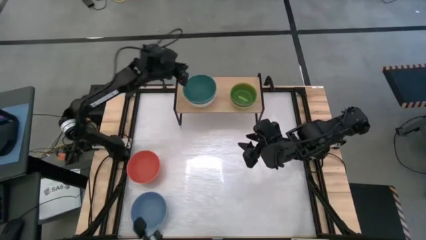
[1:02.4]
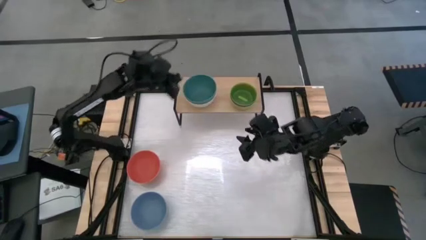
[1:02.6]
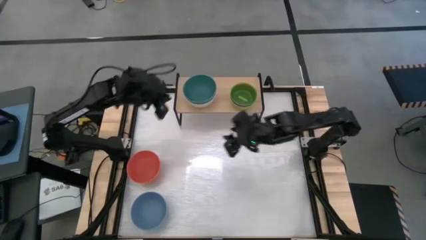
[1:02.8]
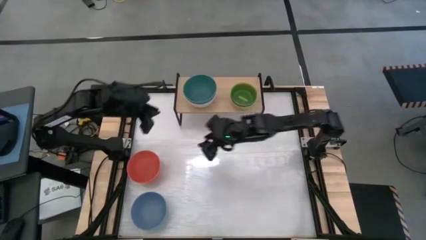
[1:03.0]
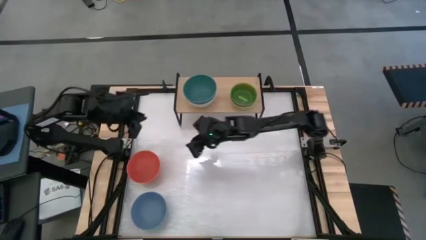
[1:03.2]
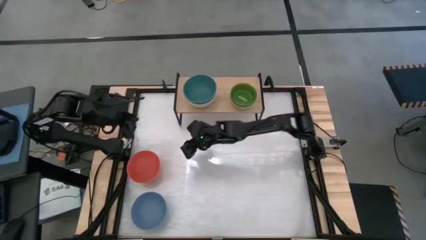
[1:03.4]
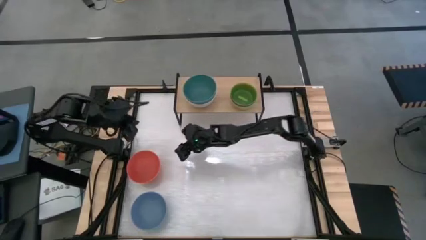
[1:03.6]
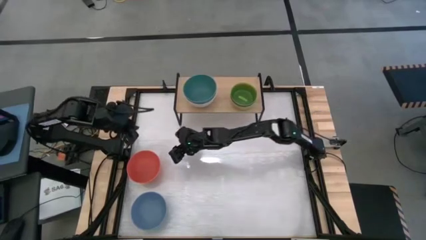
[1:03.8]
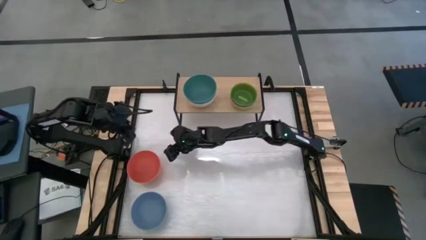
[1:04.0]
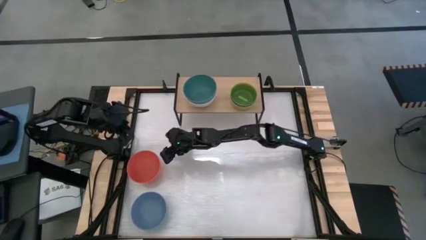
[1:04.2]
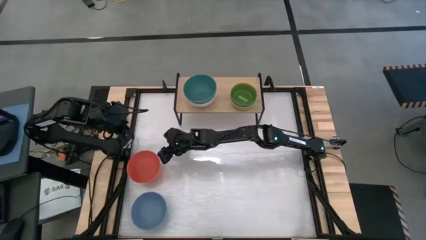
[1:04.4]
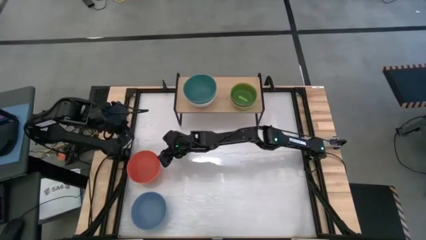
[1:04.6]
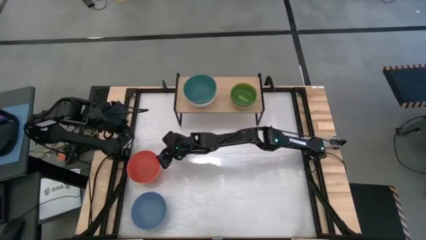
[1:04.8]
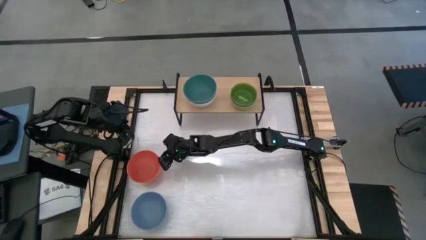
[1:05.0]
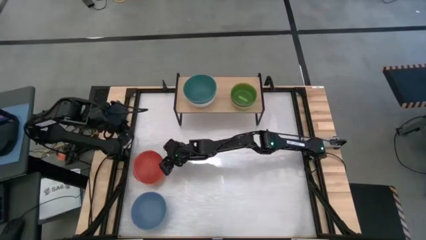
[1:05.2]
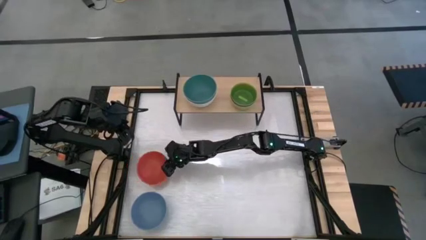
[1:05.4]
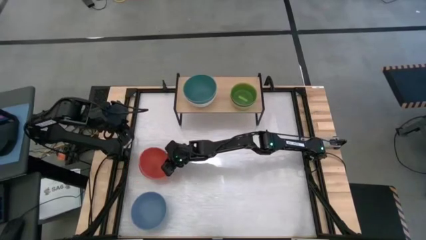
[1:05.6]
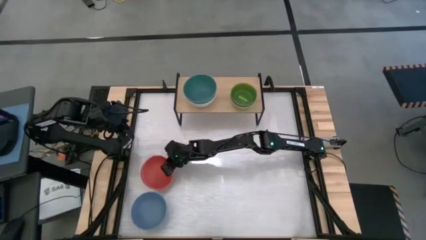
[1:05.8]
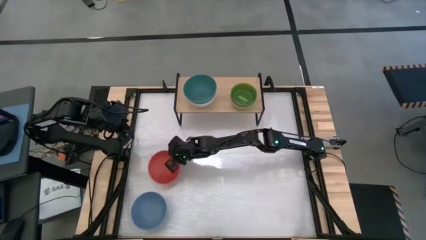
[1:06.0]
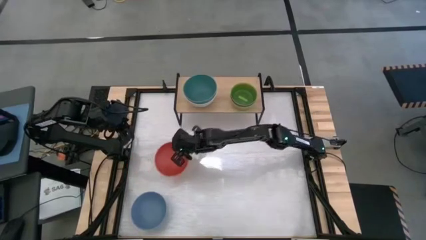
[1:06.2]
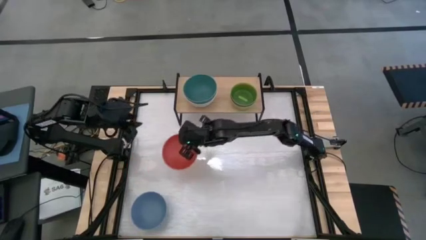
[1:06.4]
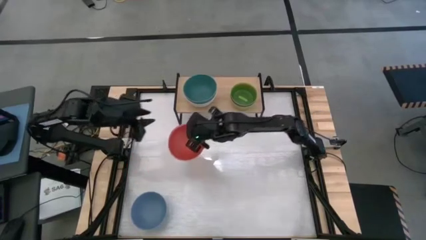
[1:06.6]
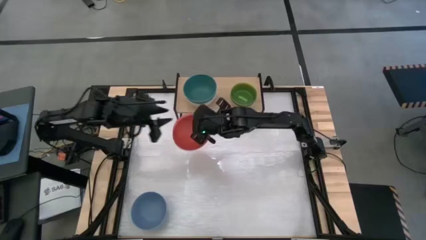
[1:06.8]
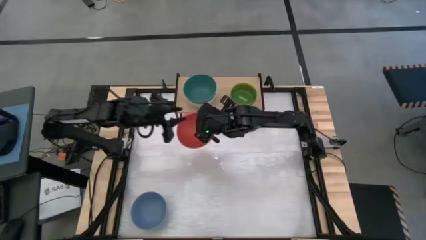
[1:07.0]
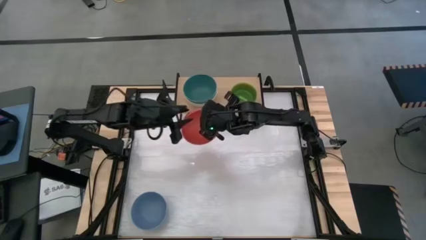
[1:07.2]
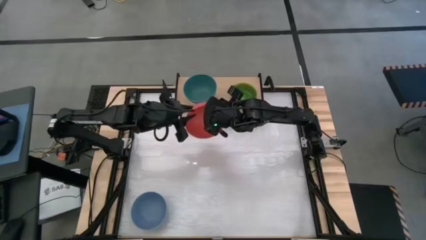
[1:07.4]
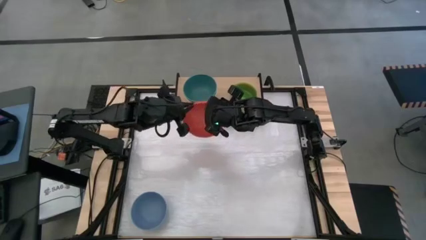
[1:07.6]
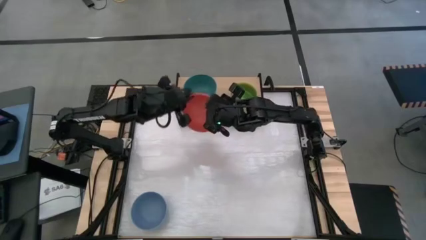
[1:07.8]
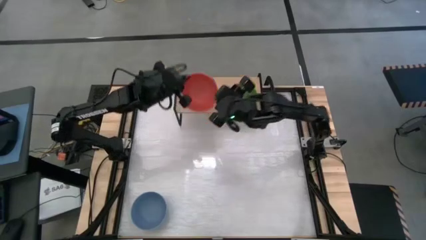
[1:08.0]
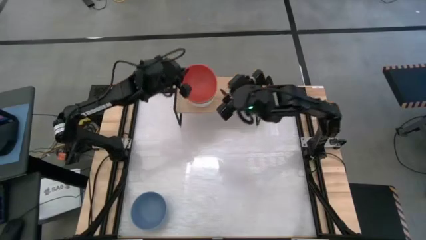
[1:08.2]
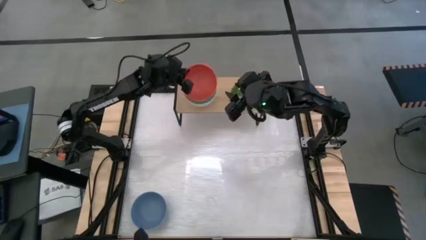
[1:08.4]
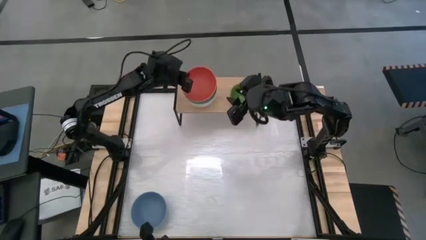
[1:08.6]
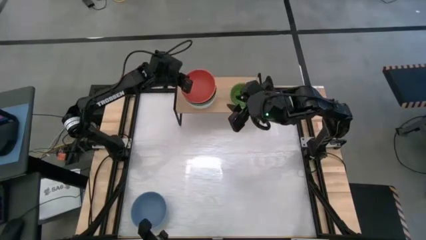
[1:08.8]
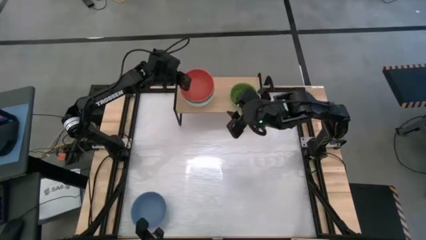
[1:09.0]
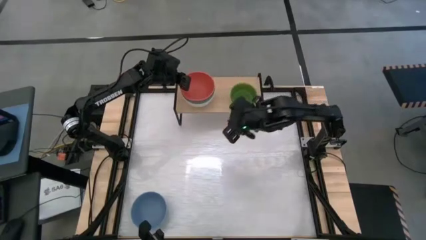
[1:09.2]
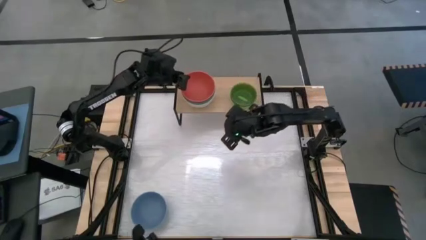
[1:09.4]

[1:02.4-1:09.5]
Task: Place and stack bowls onto a shelf
Stack the orange bowl on top of the dark green bowl on the shelf

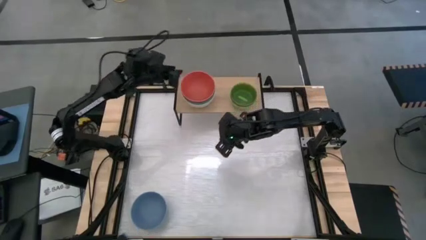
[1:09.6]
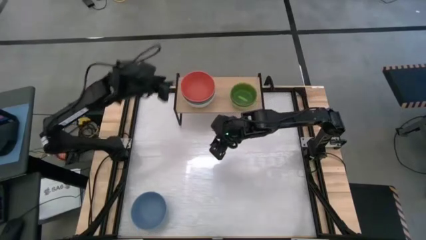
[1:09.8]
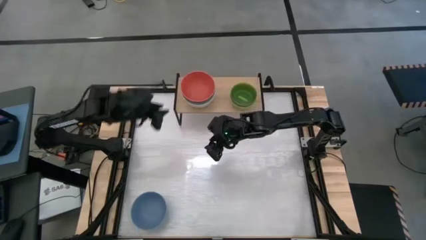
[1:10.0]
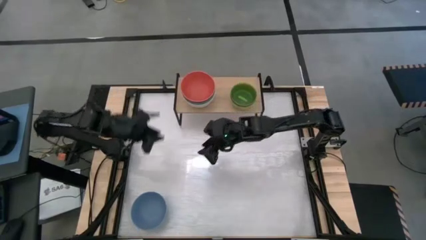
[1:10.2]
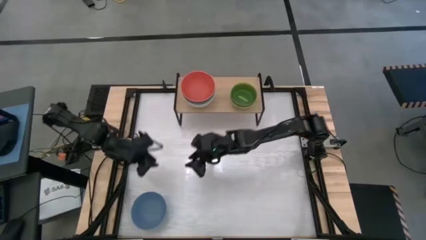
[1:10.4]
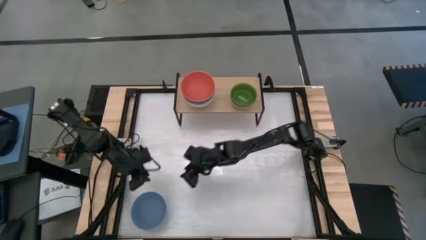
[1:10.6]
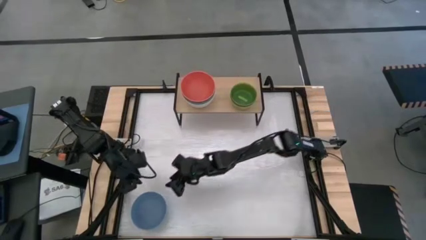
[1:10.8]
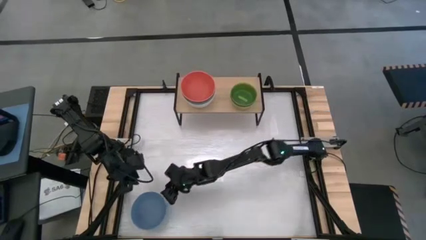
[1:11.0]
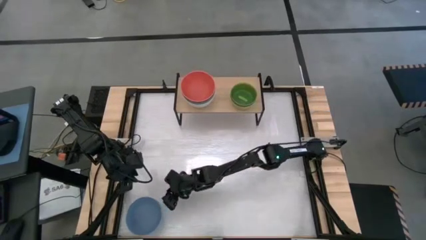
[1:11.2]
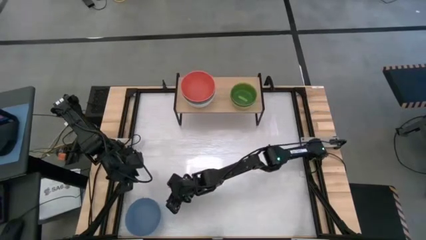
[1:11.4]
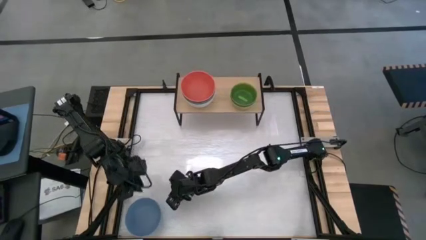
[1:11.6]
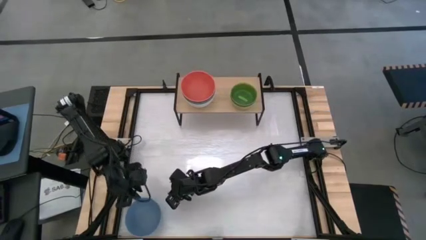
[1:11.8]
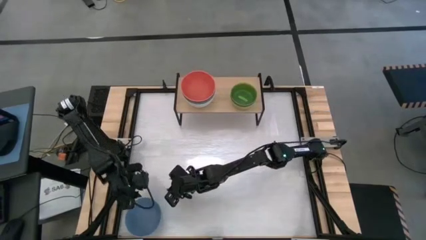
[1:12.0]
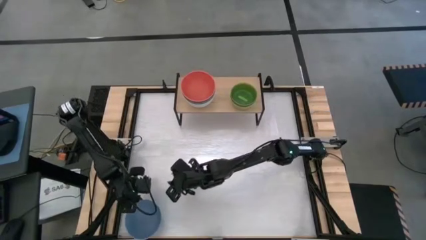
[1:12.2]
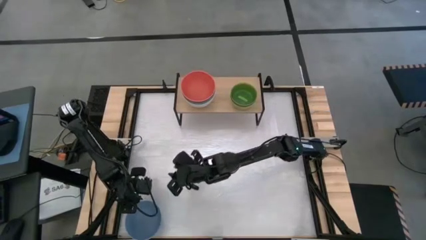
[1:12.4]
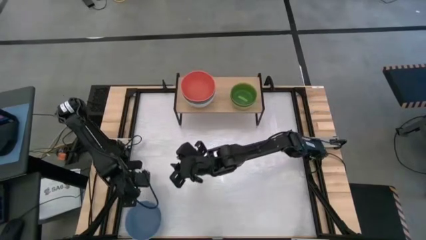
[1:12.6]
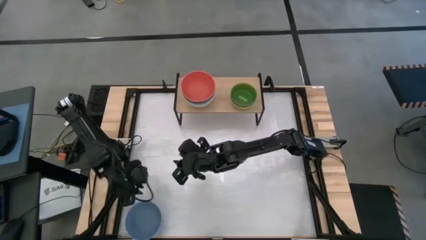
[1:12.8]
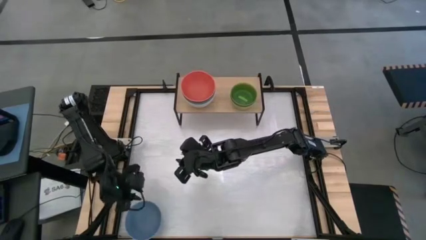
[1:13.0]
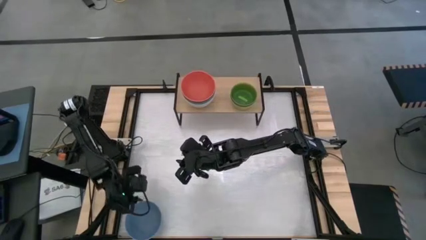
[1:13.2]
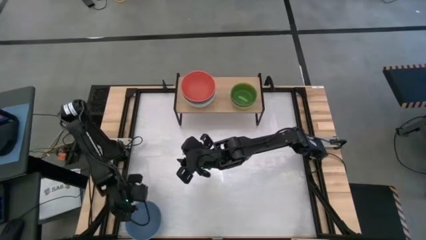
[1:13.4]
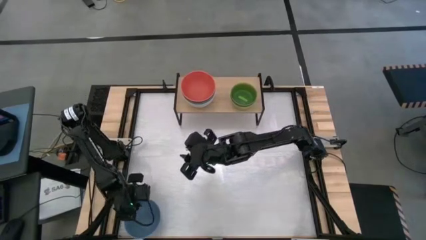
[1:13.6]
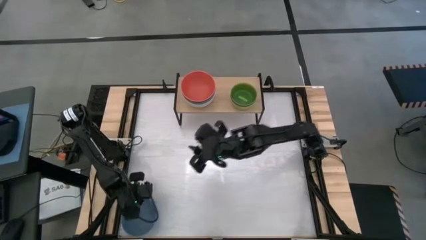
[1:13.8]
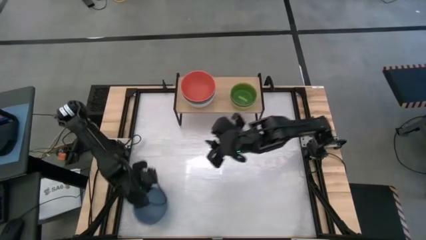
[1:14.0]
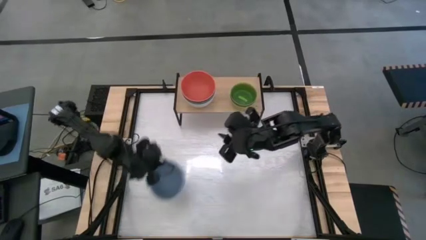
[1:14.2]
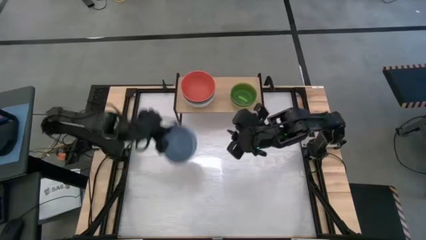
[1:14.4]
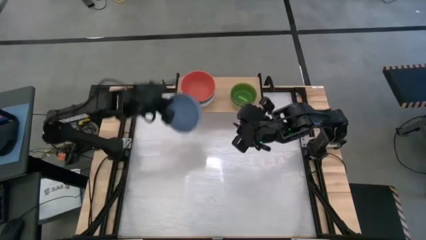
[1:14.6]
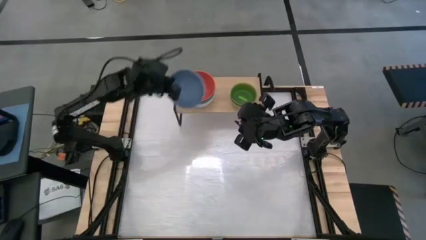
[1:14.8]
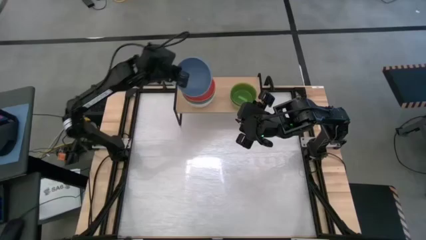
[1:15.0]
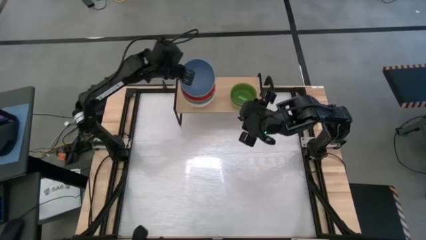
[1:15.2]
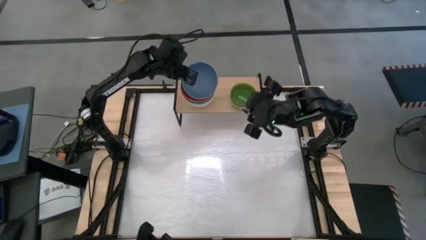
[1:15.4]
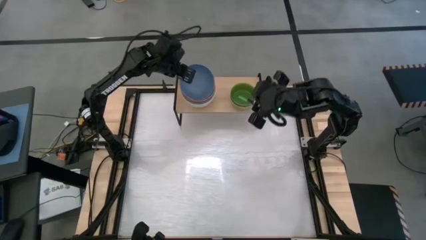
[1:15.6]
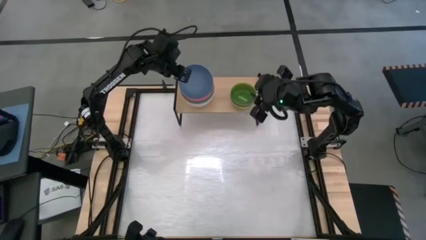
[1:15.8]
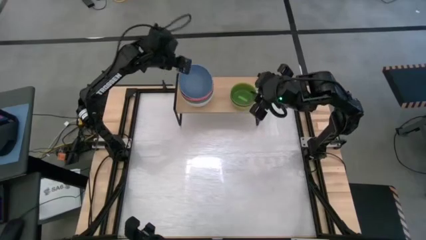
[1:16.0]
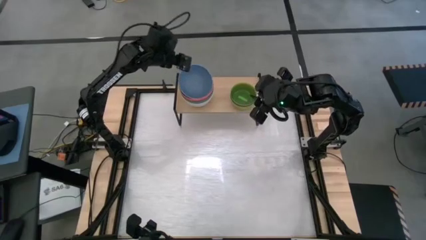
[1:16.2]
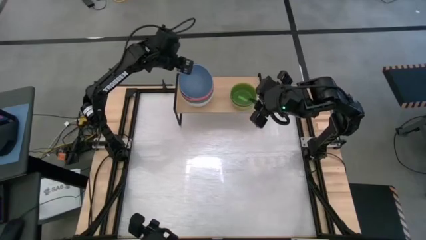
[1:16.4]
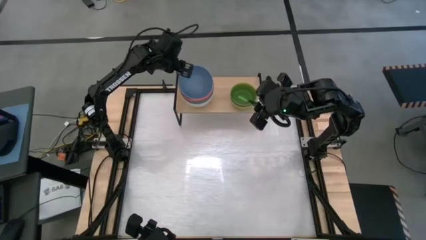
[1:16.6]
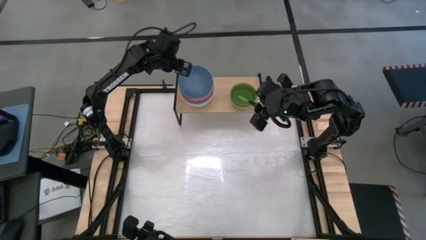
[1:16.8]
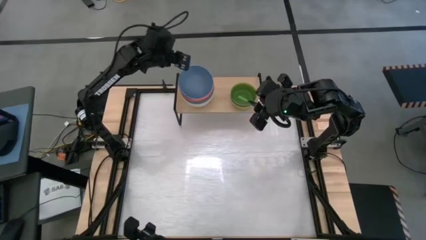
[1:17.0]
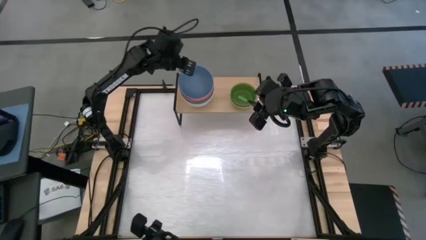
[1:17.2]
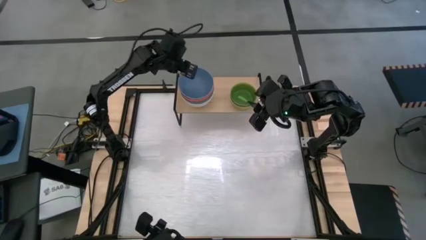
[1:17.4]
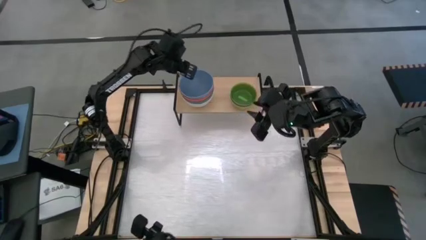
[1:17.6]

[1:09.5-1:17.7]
Stack the dark blue bowl on top of the orange bowl on the shelf

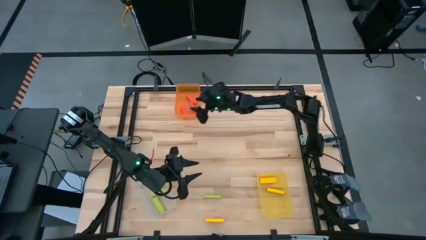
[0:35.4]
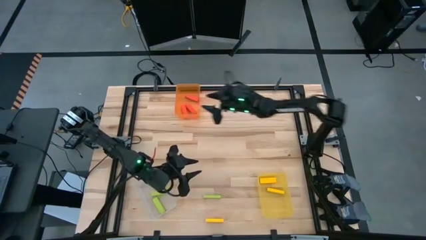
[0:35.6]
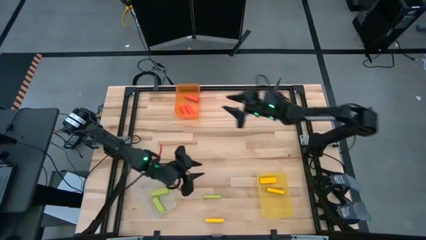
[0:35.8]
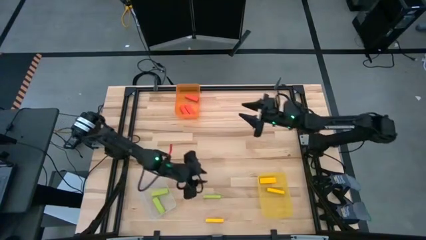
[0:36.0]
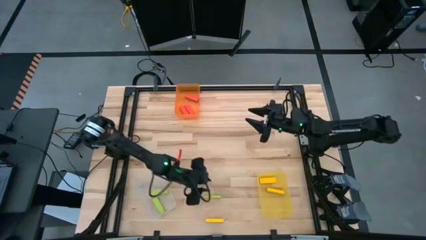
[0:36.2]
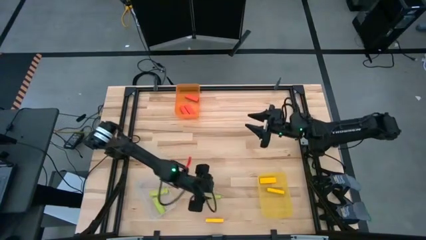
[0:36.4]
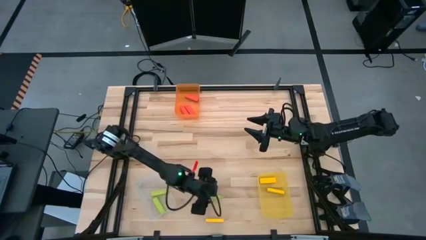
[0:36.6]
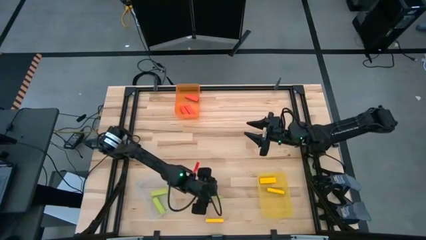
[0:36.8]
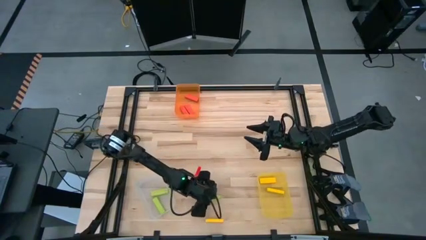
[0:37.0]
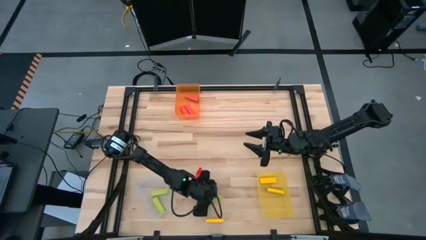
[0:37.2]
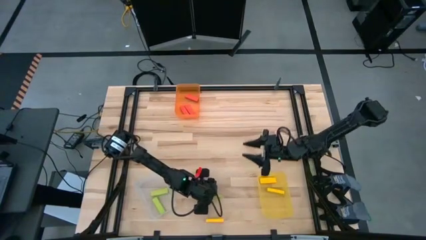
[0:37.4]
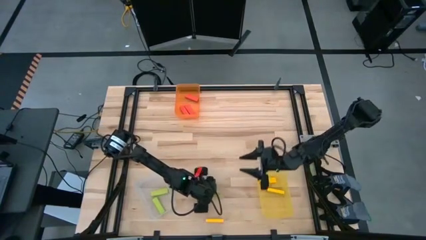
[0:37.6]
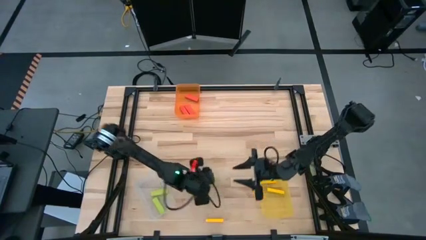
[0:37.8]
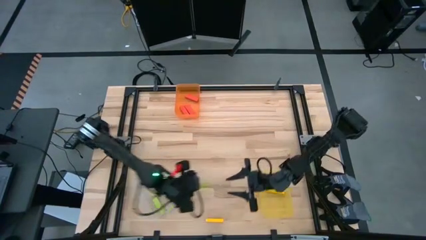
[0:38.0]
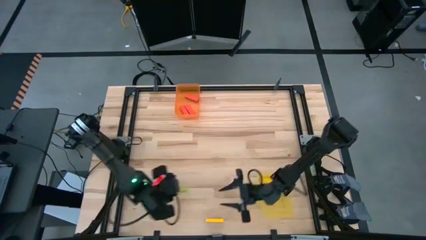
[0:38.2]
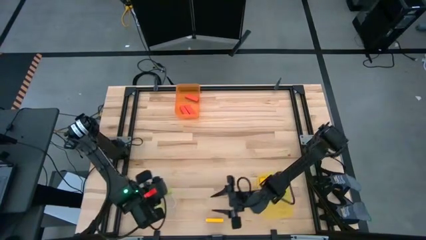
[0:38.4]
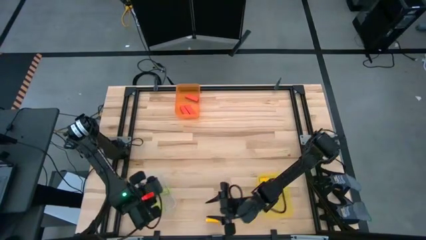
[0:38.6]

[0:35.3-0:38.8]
Task: Sort blocks
Put the green block into the transparent bin
